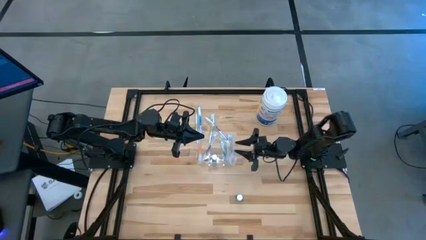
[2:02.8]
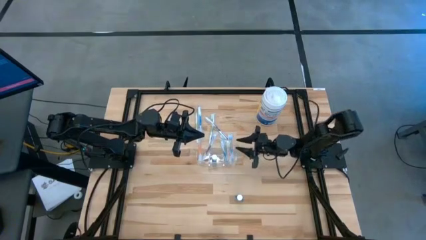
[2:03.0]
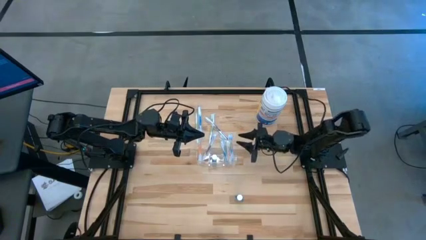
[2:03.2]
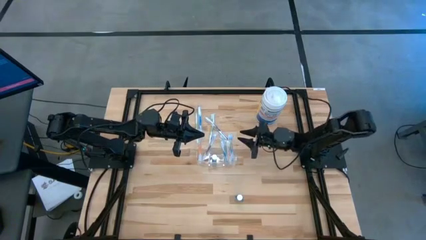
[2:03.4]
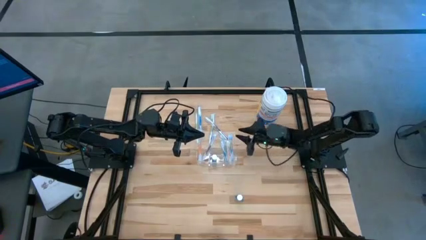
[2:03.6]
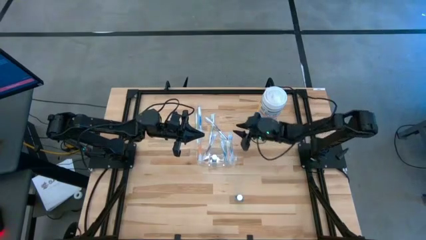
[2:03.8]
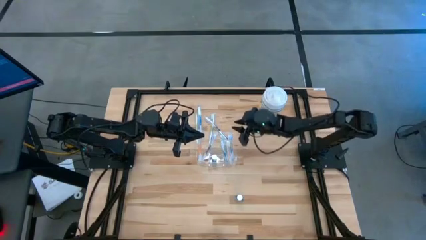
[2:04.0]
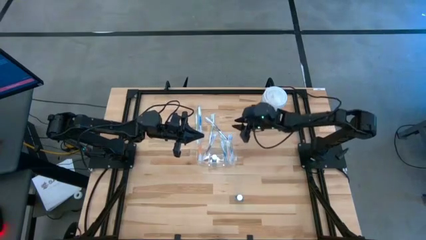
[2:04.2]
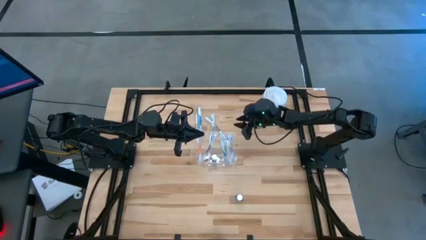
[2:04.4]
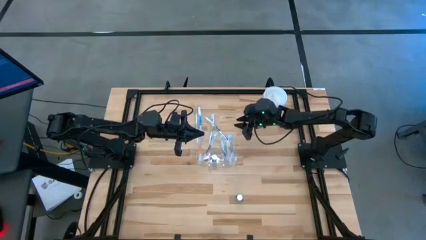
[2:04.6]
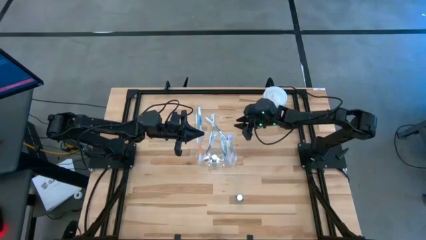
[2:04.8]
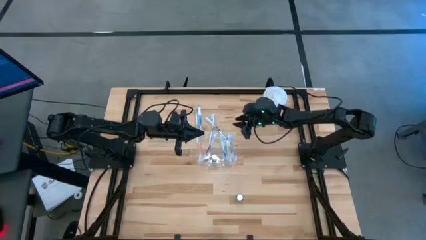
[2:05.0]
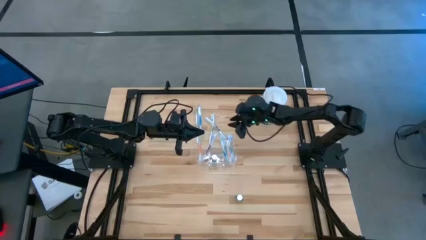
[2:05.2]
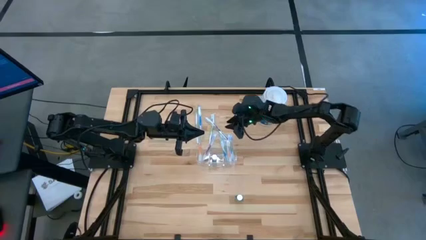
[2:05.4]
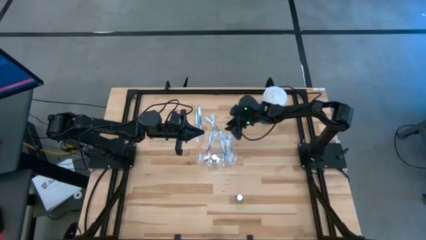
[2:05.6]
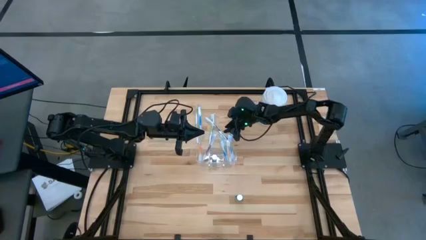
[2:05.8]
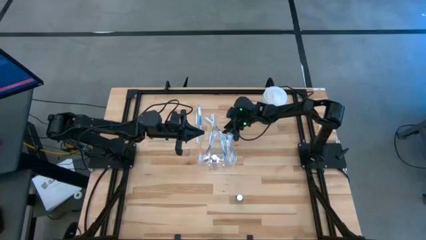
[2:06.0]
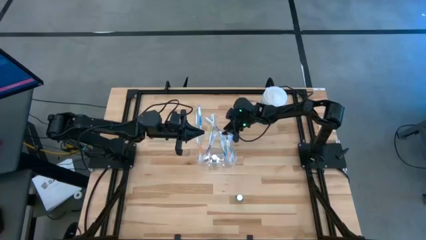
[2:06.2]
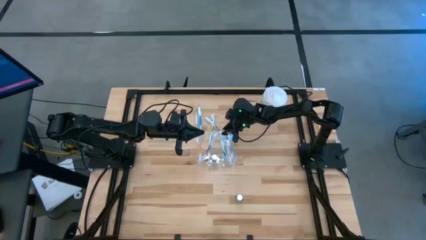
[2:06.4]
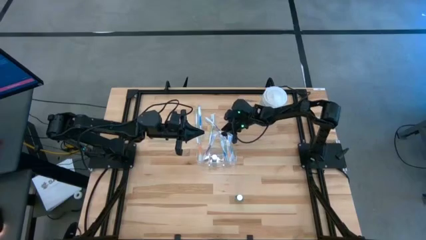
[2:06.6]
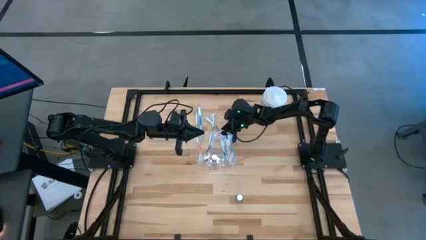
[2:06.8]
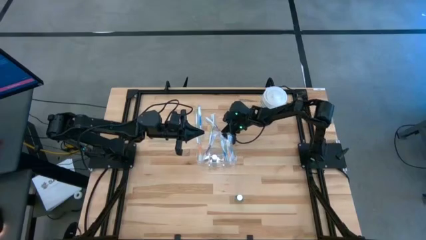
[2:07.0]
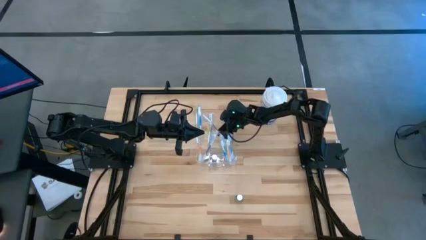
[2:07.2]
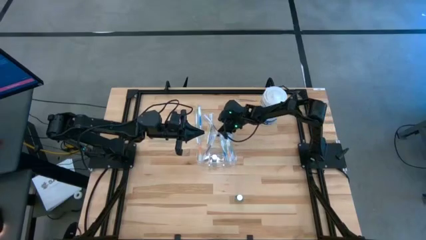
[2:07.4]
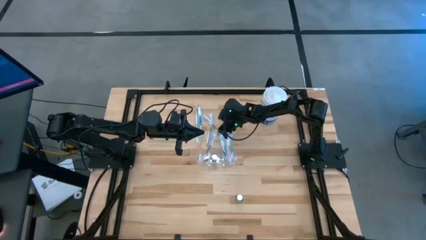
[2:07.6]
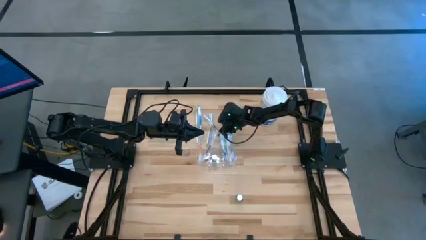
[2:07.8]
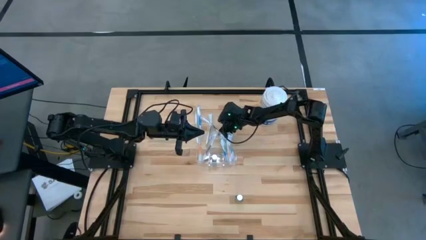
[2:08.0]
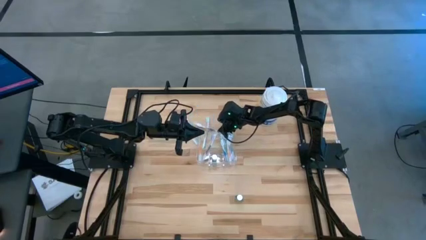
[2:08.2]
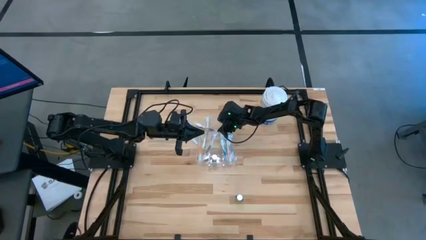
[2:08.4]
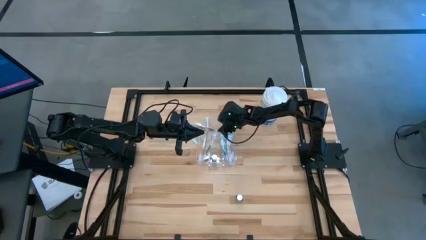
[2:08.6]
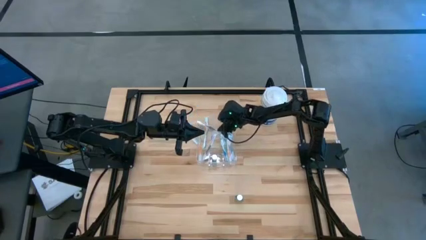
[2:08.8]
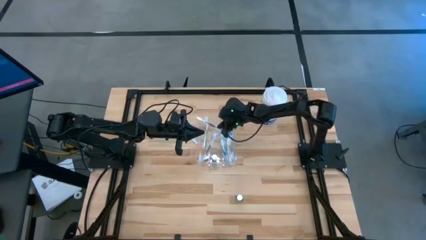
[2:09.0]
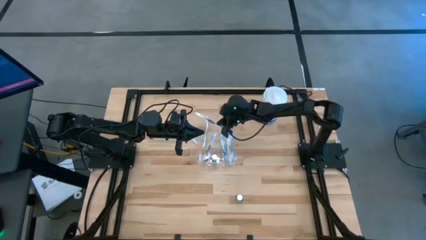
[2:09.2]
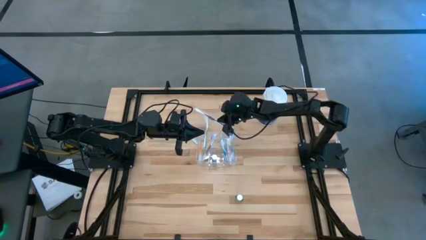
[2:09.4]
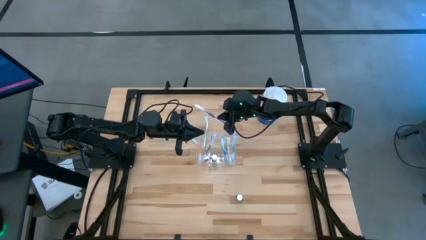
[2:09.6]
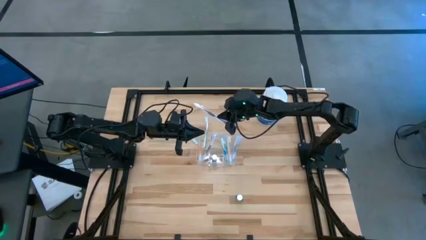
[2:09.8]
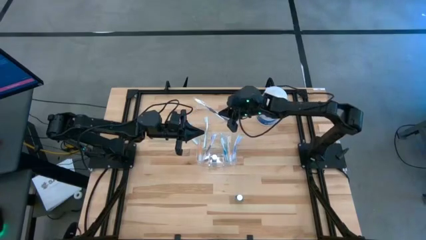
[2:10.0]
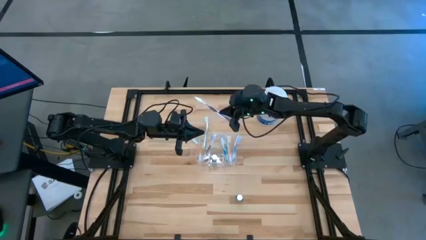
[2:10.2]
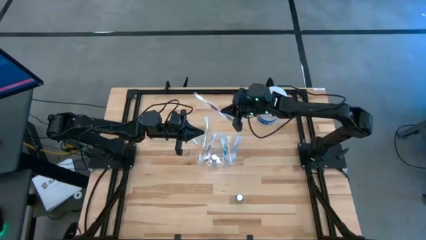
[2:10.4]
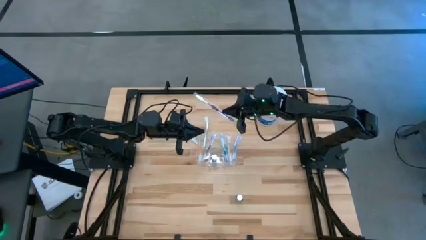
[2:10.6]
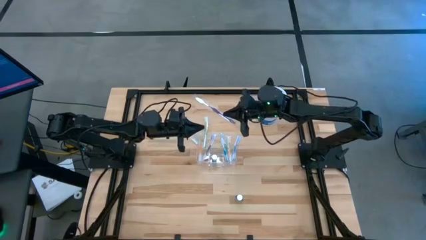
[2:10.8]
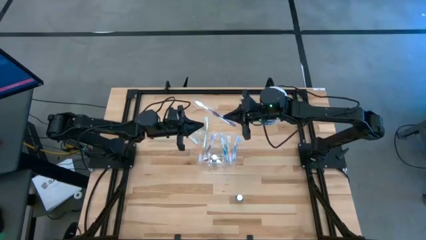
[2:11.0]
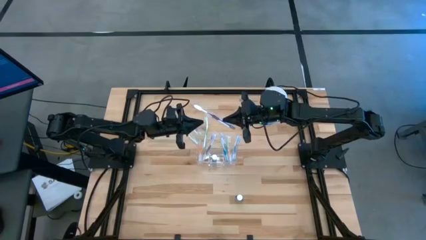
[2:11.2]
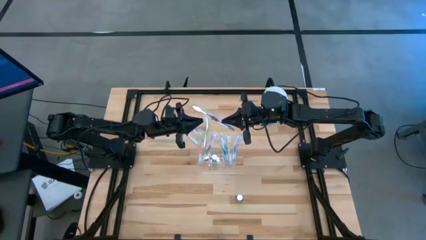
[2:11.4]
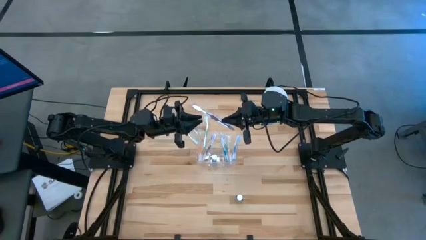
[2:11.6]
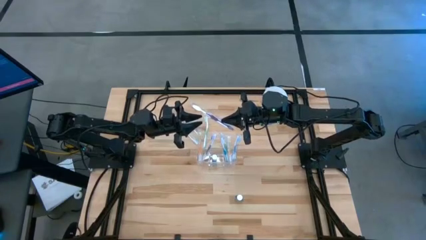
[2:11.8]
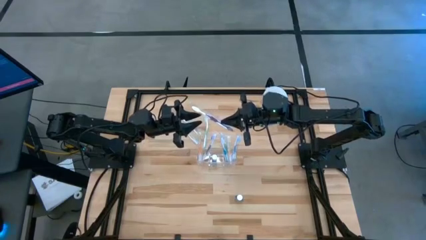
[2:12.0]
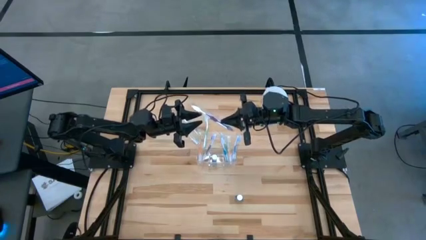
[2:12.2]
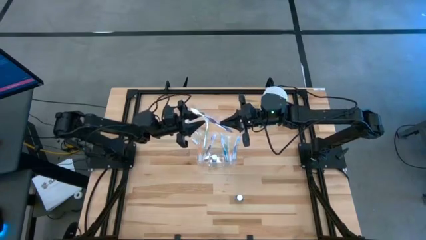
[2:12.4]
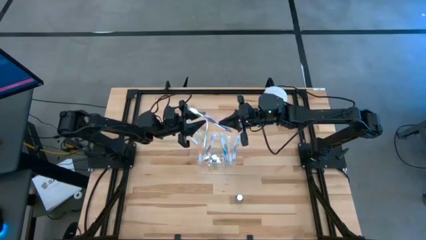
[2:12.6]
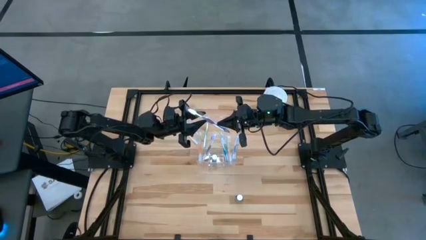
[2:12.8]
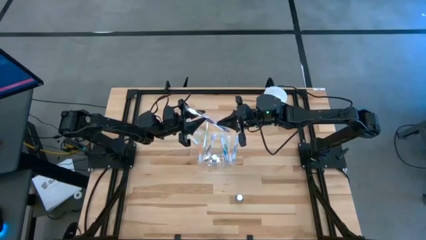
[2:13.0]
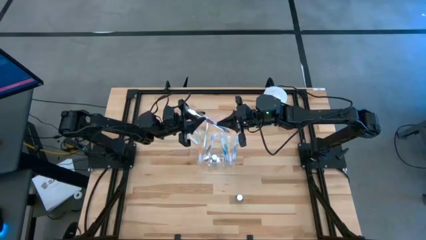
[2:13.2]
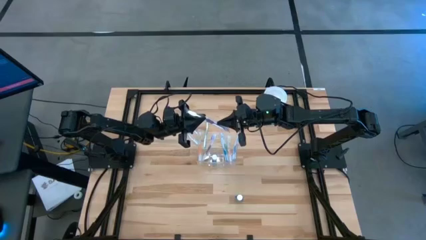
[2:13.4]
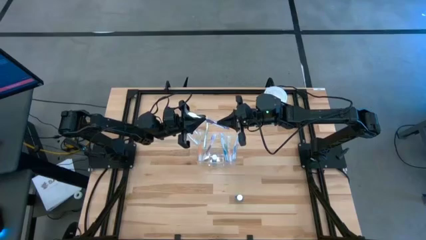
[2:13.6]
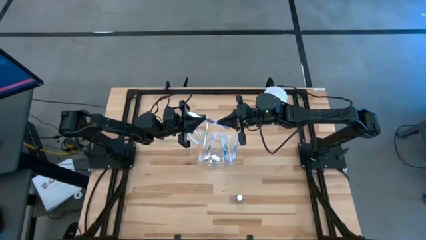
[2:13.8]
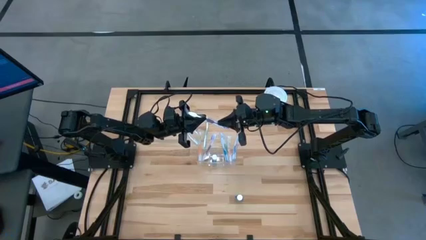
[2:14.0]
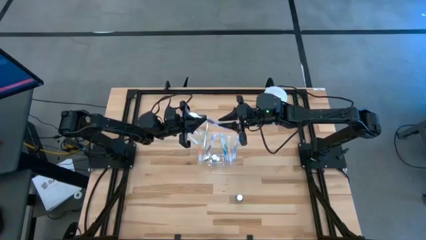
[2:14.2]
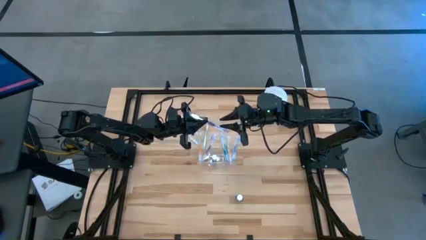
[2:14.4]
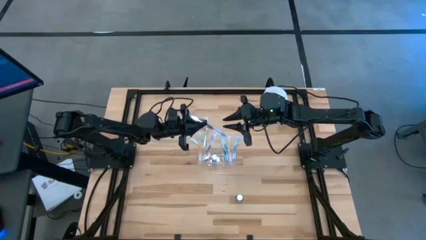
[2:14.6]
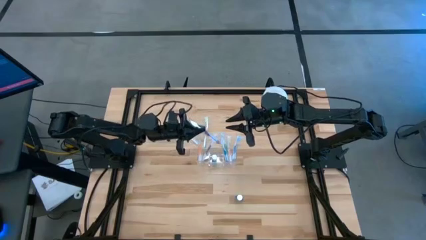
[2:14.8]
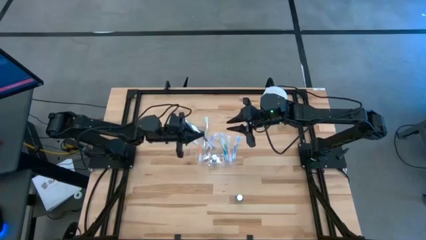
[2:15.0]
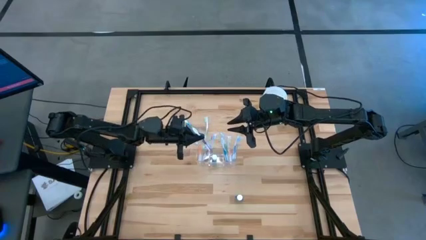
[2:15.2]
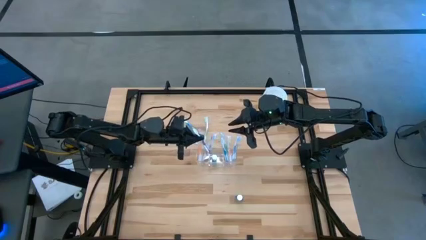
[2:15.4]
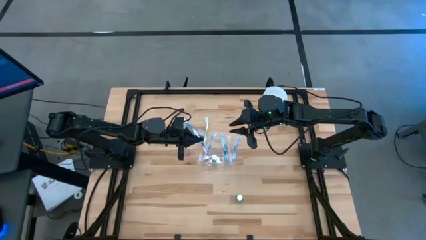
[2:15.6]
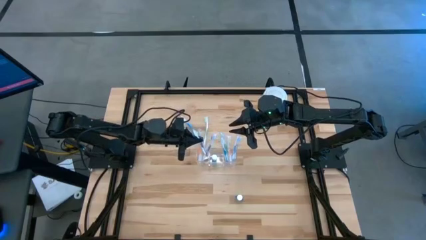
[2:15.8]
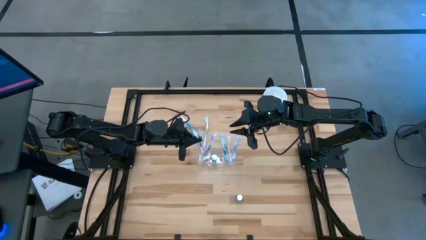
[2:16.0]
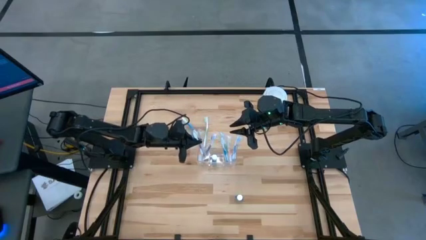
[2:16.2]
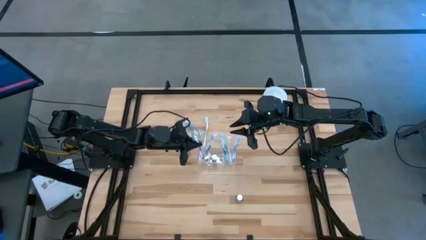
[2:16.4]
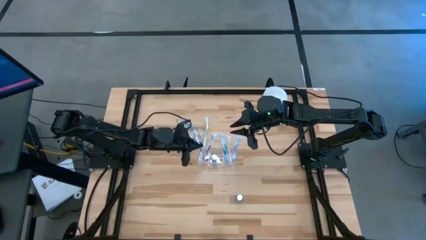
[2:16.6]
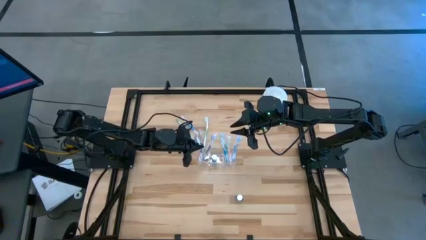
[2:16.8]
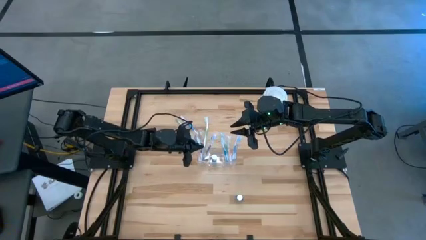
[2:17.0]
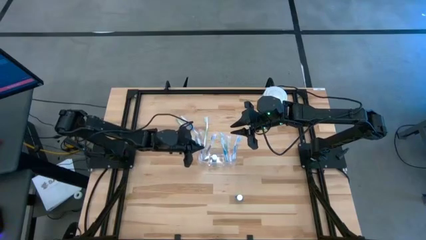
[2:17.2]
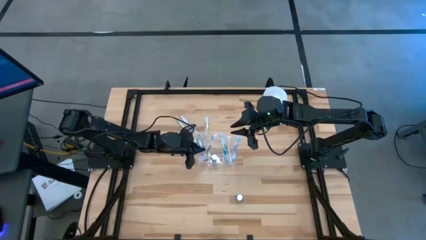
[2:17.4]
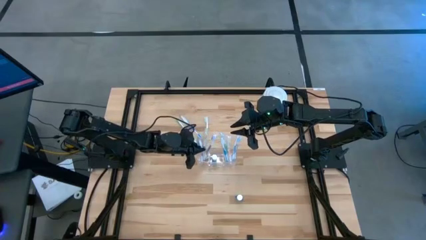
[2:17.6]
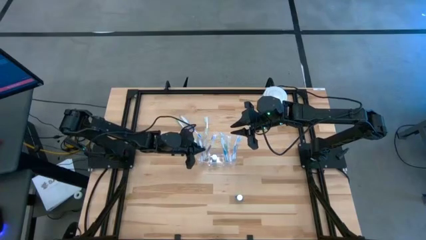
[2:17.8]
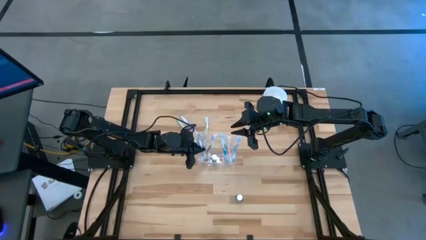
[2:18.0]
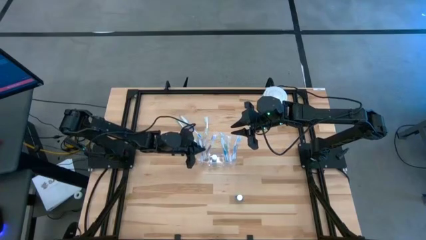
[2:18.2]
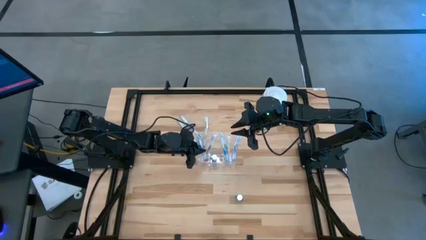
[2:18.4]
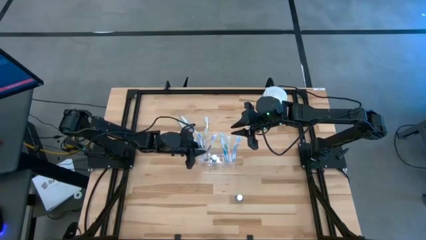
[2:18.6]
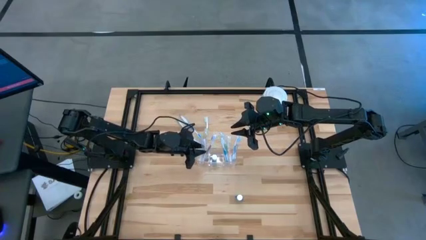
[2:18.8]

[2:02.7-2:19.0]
Task: Pick & Place toothbrushing station
Put the purple toothbrush into the transparent organizer
